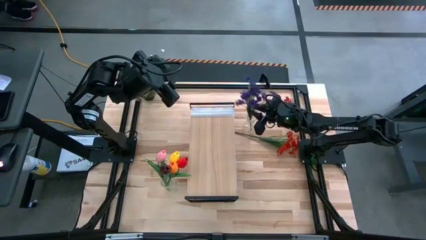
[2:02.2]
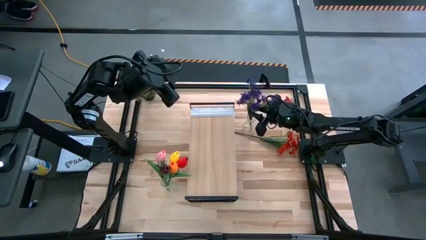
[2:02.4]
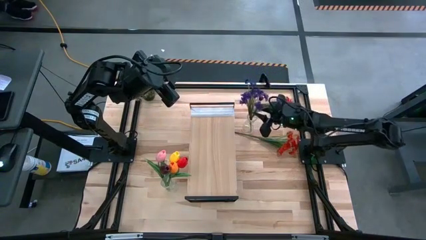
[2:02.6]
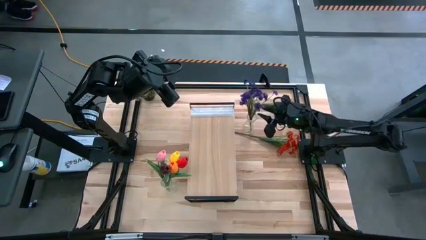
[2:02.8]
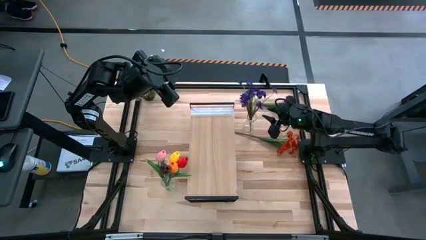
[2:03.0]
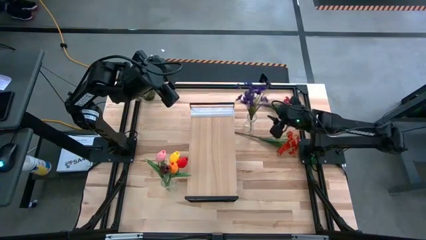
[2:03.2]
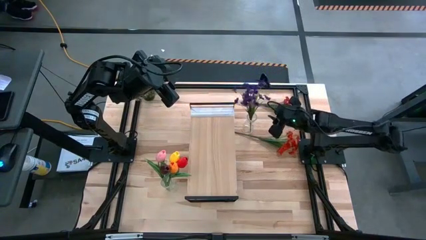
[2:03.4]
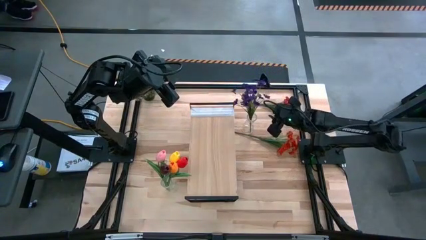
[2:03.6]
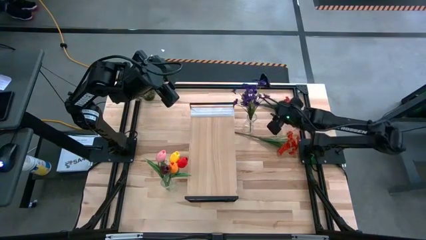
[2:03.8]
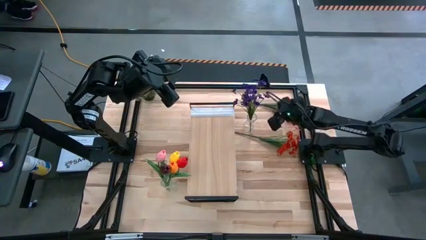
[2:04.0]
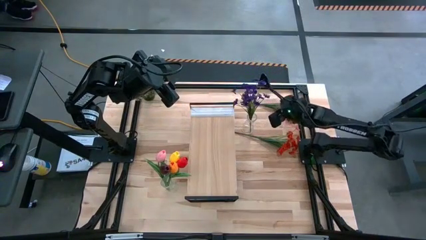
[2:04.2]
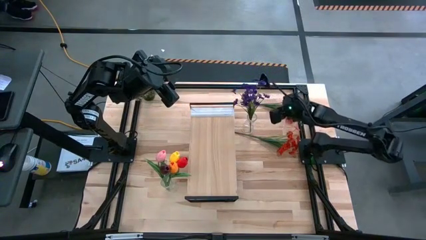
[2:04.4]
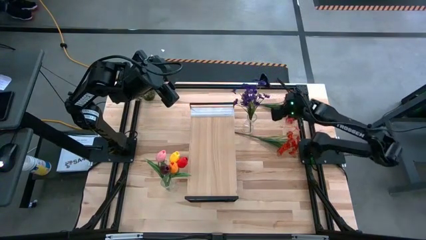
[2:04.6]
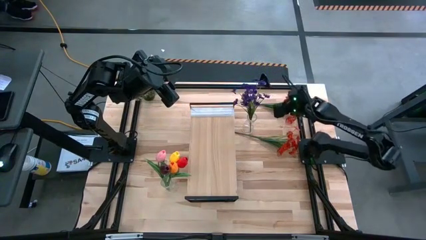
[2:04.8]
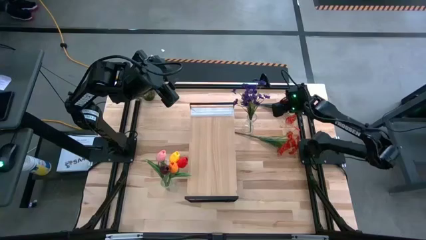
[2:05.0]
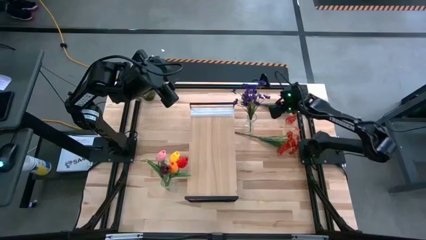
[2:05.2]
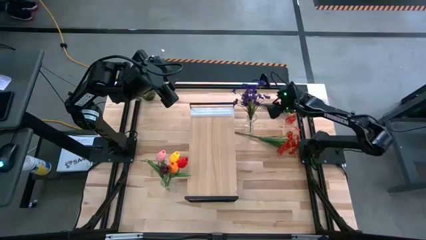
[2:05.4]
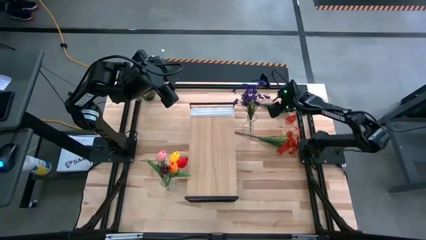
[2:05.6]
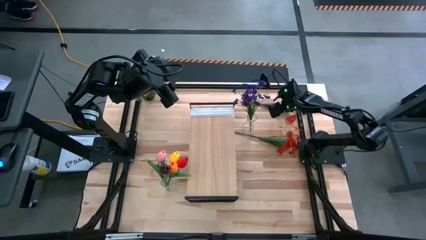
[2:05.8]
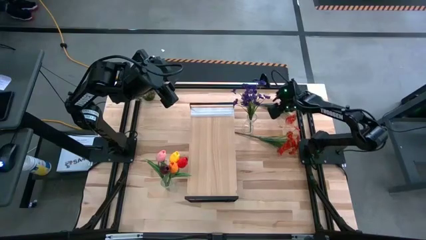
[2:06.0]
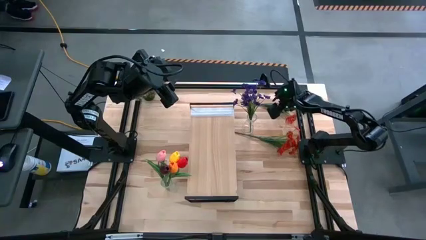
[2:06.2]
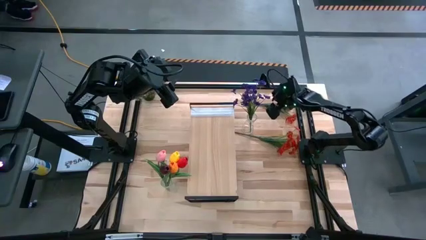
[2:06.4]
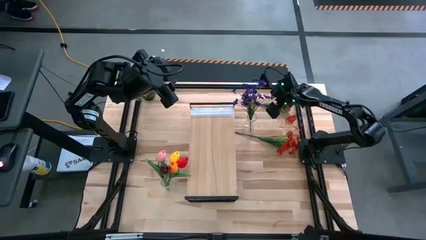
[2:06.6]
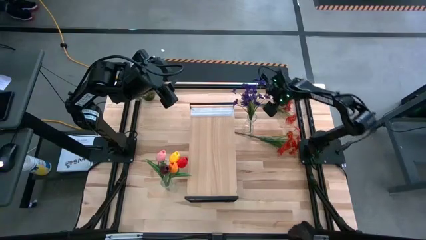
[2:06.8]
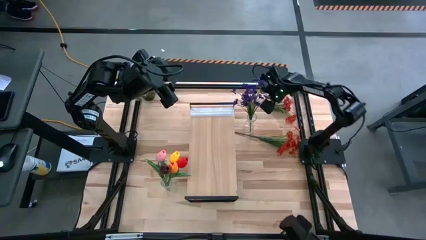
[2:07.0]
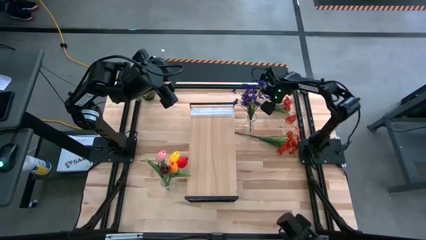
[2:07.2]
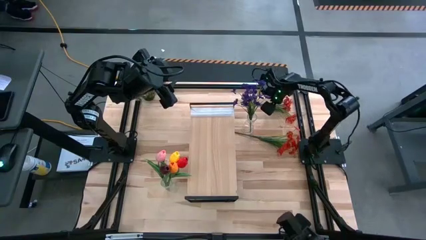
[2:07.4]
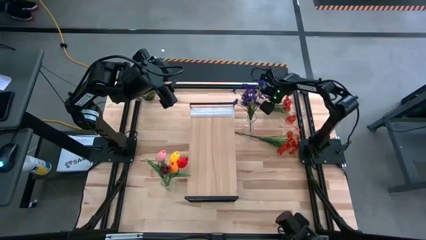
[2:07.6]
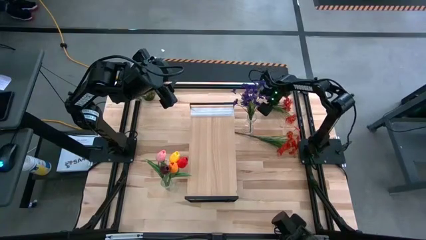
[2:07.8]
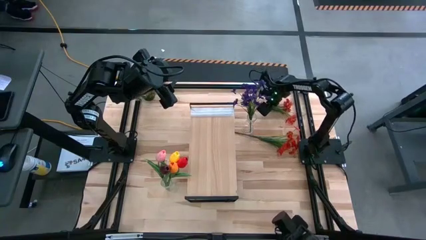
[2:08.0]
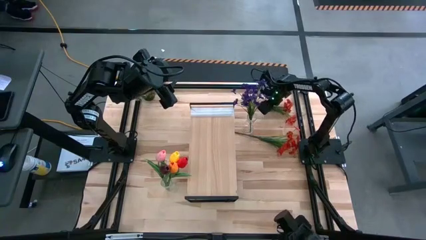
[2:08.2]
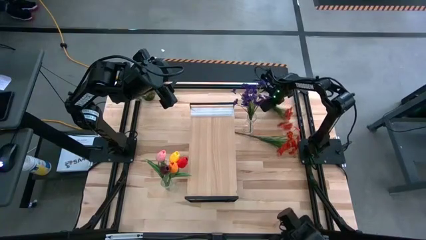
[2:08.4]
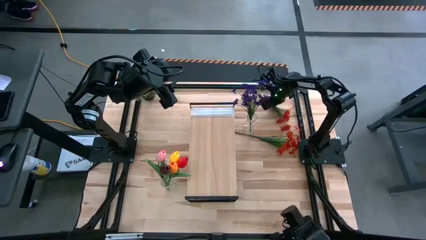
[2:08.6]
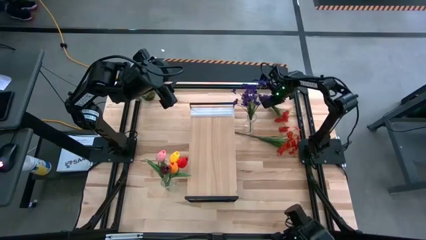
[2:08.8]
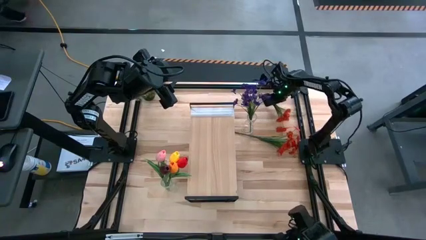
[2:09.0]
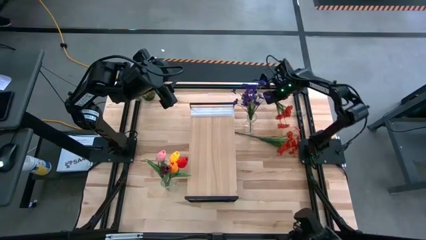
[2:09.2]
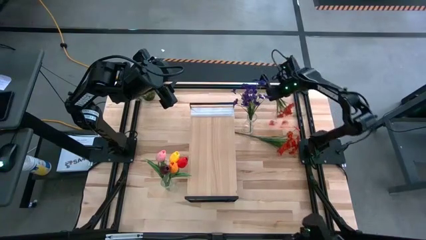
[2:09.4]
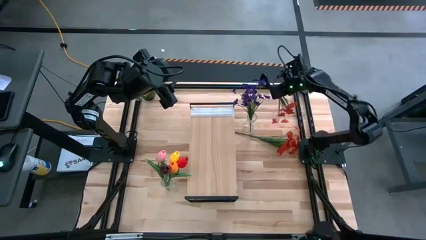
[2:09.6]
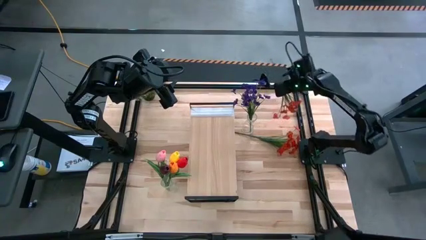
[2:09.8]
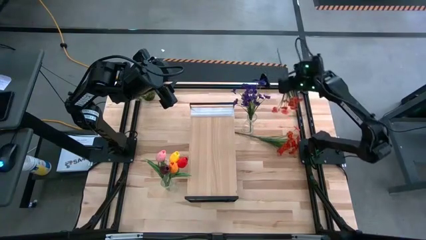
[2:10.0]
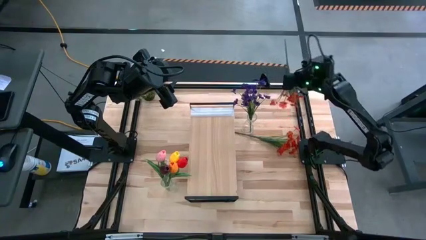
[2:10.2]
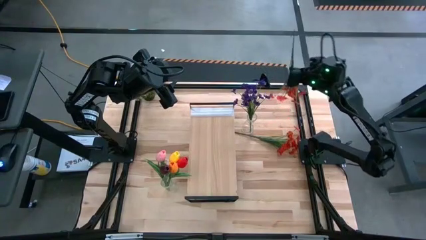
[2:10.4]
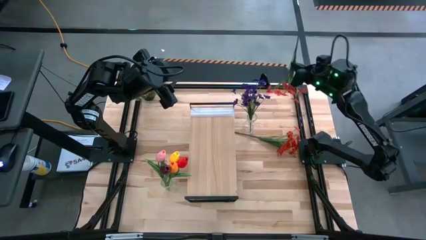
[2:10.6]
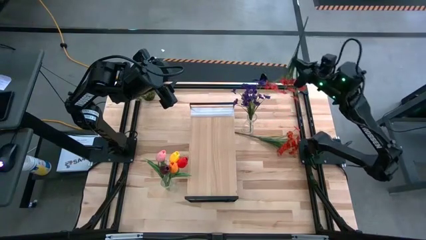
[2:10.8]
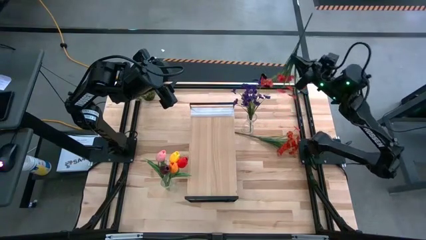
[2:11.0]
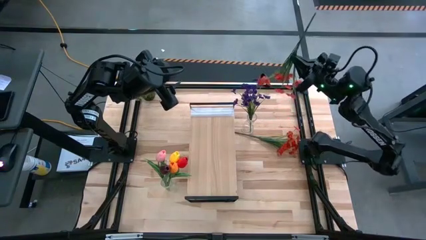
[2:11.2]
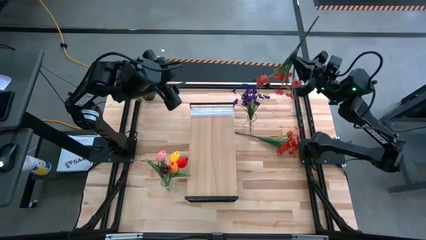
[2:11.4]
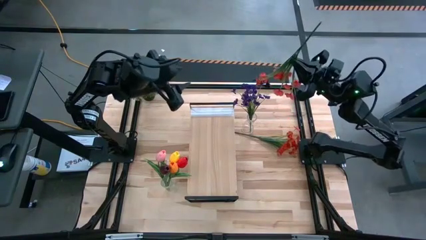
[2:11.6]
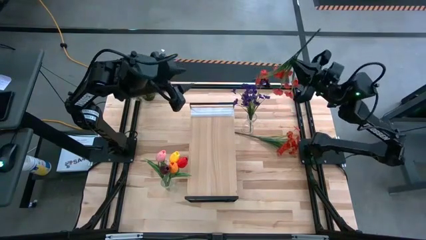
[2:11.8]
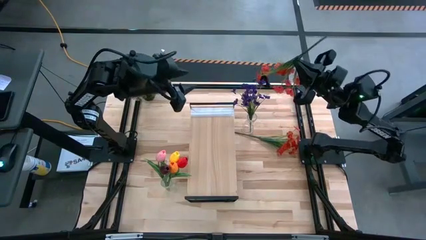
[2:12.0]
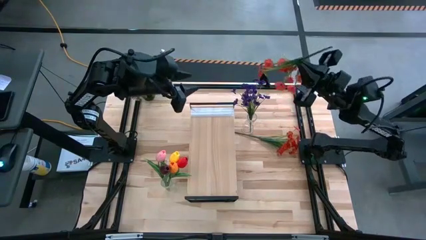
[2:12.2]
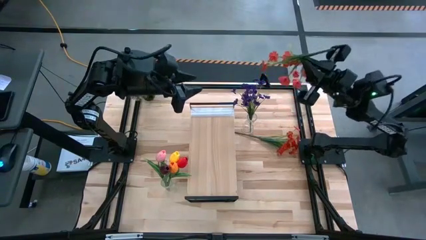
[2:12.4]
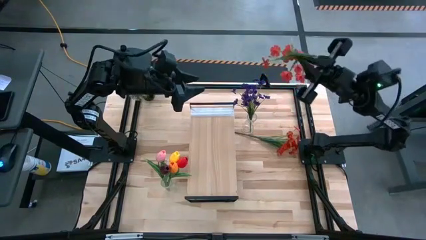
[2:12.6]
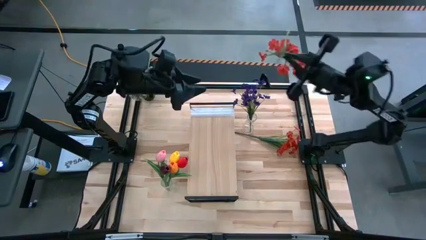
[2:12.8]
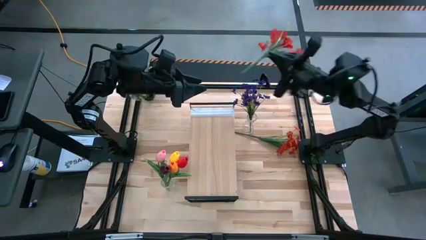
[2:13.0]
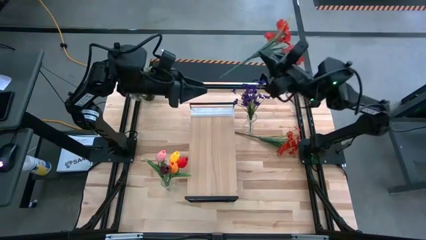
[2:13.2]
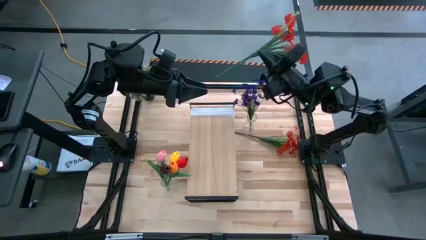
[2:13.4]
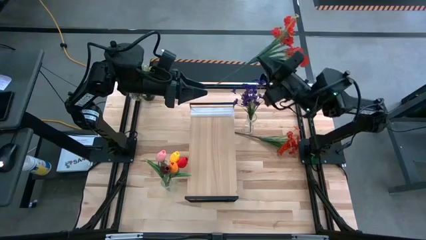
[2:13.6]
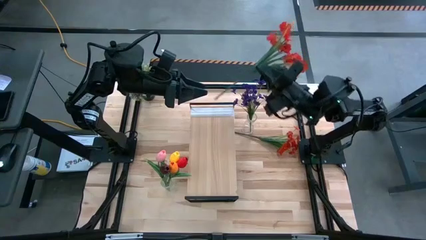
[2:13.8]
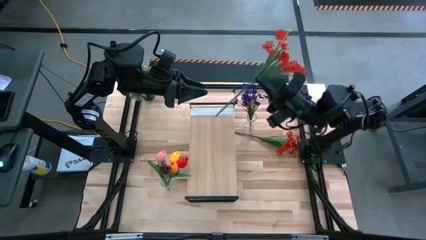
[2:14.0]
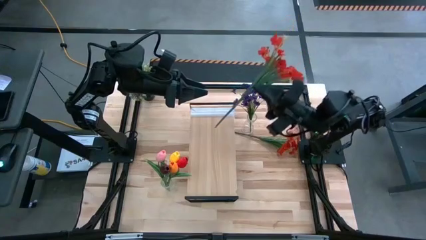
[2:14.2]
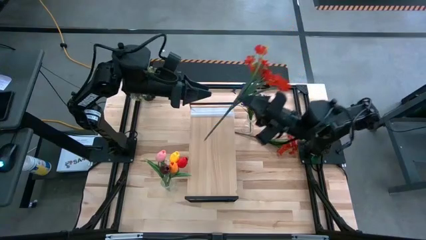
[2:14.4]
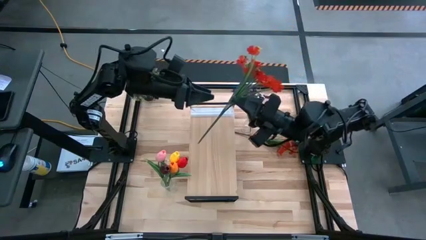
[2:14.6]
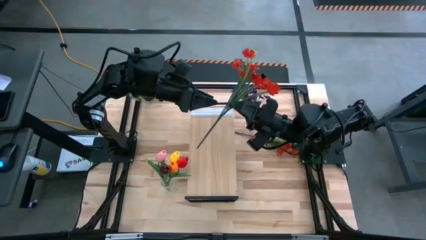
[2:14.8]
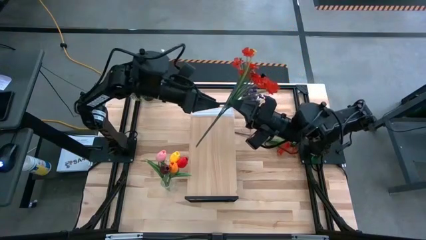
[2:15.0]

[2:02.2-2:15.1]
Task: Pick and place flowers into a vace then onto a shelf
Put the top red flowers into the top vase

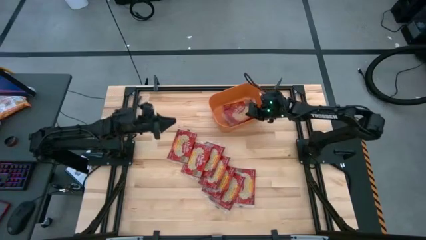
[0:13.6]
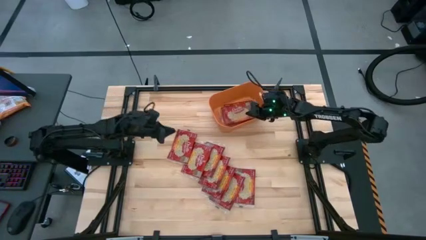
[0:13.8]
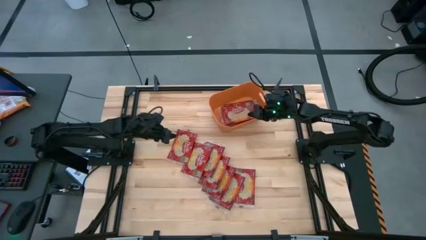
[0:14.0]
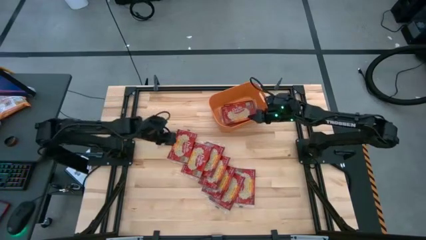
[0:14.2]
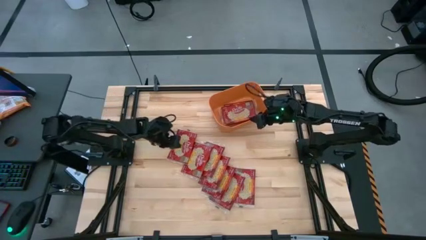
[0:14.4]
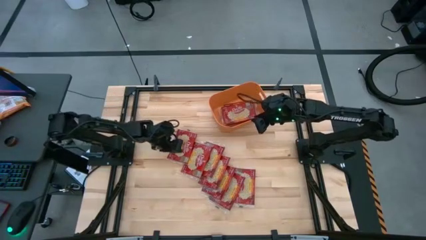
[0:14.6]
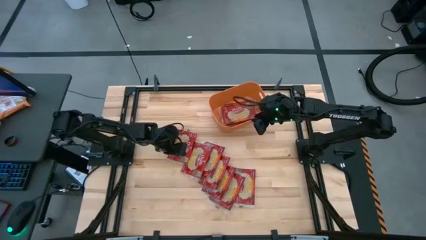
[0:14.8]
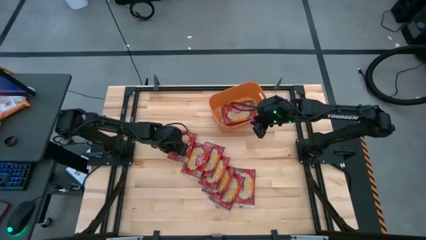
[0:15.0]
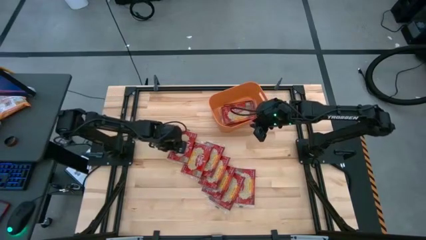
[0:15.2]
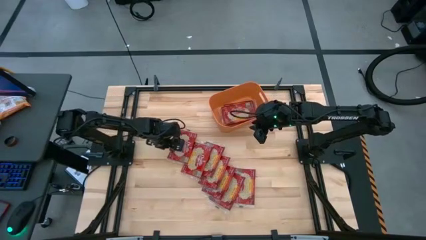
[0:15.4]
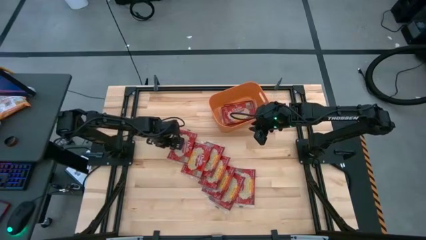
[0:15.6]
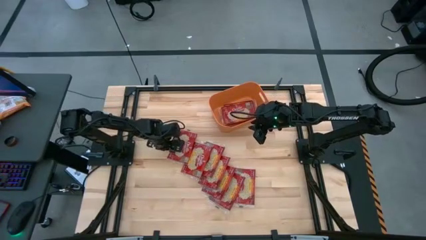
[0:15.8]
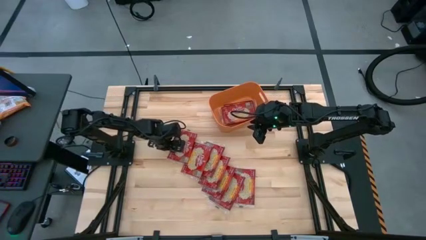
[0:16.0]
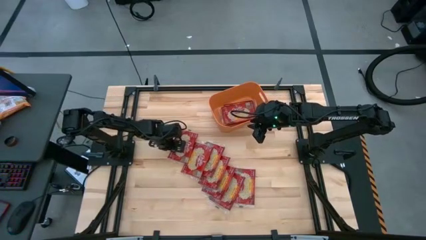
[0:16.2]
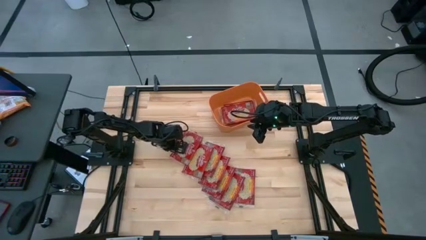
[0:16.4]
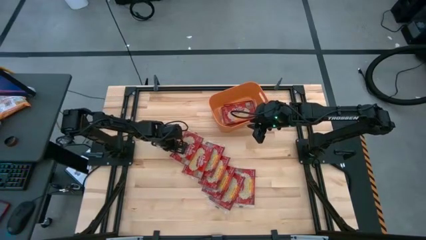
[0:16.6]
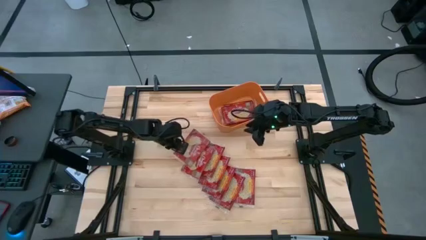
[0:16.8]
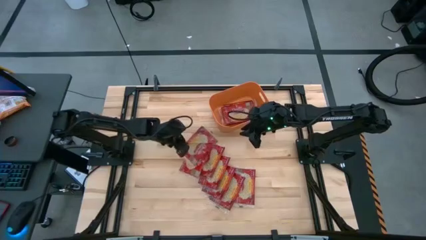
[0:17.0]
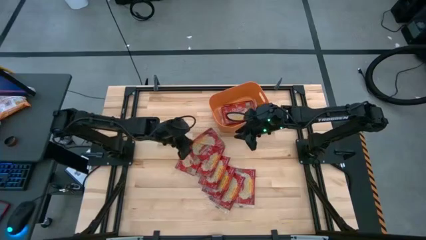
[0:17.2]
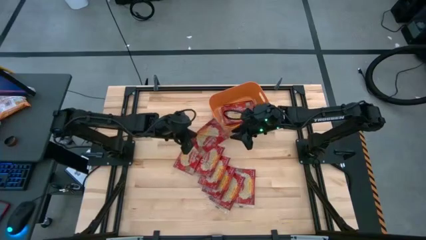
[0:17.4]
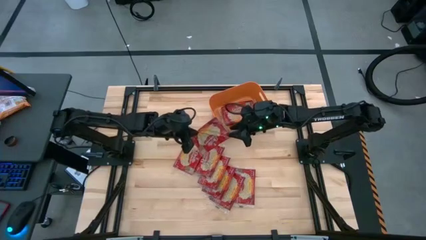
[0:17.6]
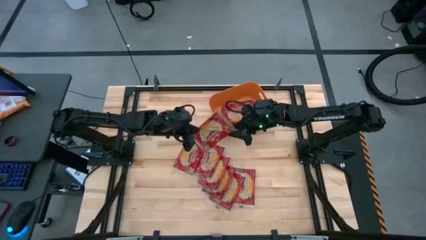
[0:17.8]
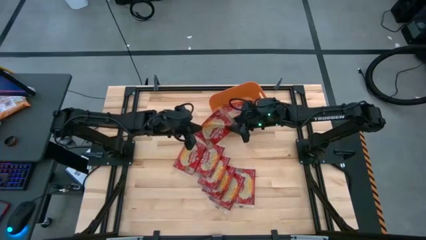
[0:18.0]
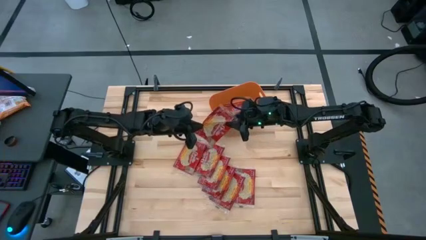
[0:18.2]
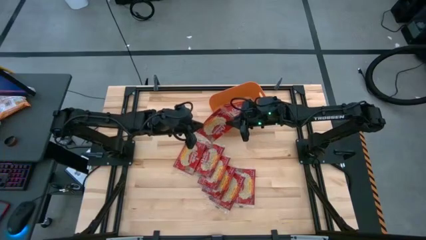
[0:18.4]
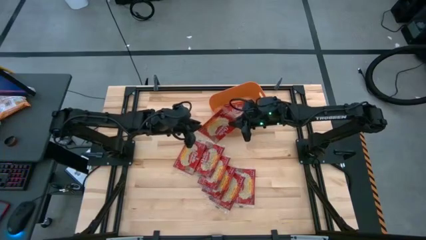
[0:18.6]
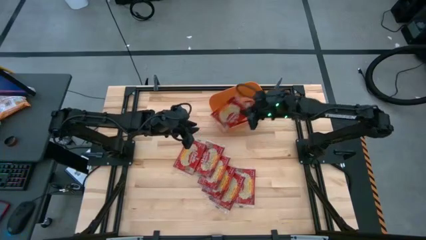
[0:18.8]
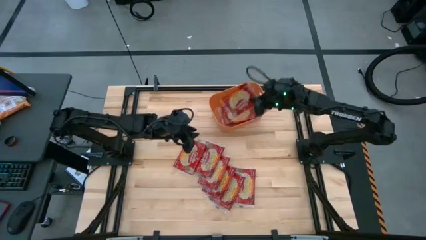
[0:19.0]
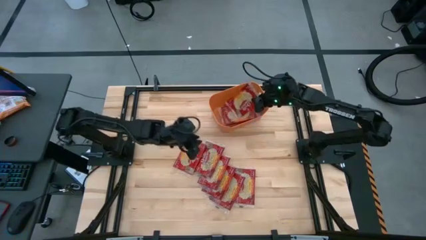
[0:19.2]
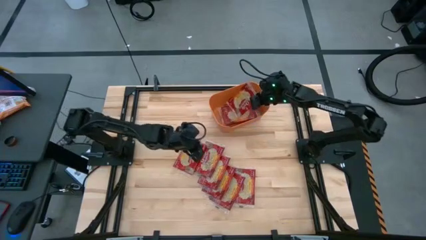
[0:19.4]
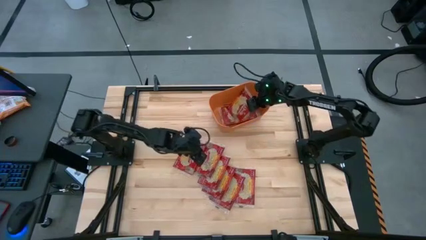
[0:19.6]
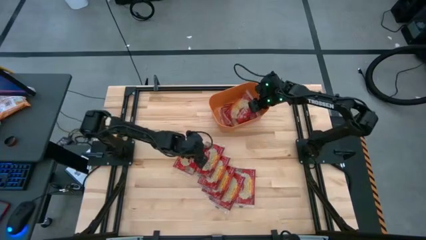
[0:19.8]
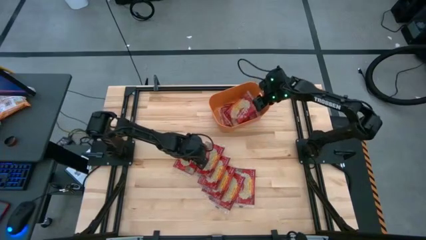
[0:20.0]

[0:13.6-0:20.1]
Task: Sort popcorn bags into baskets
Put the red popcorn bag into the orange bin
